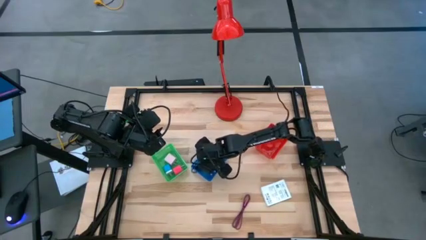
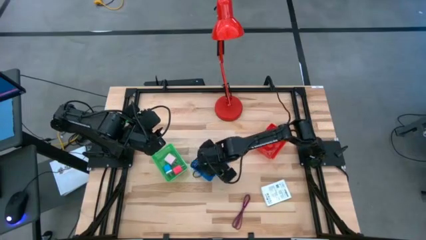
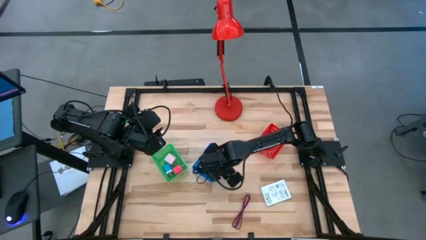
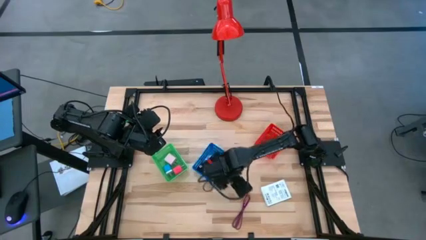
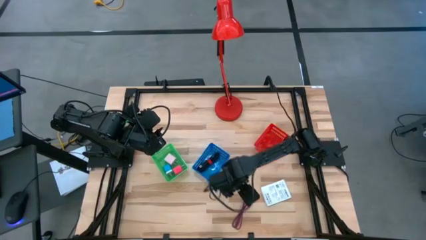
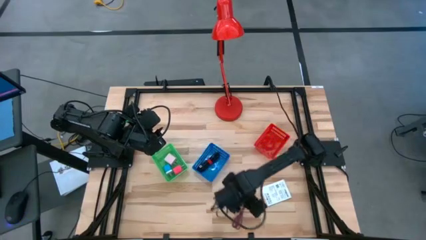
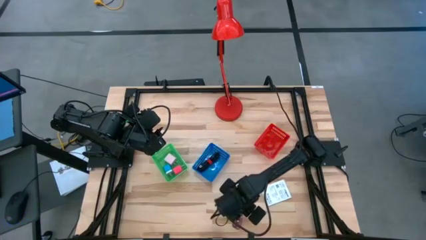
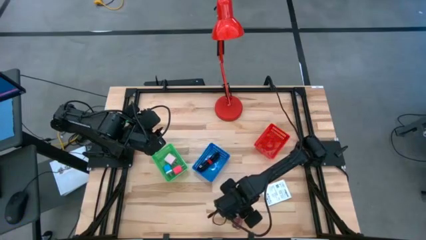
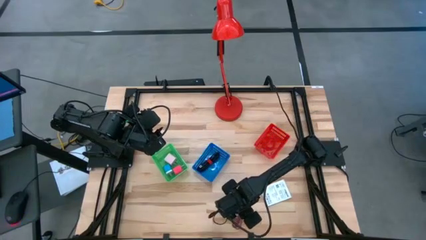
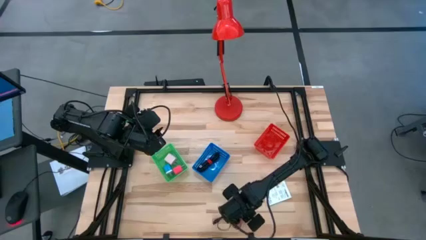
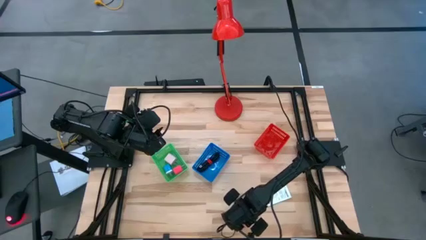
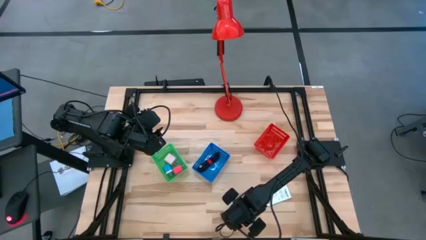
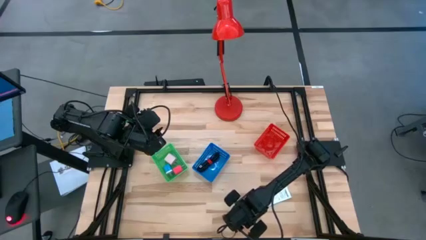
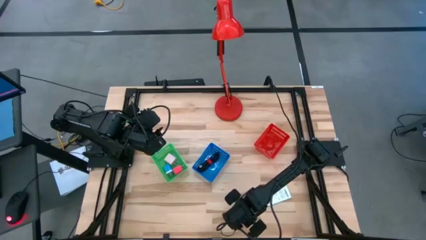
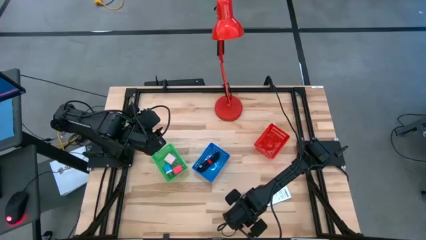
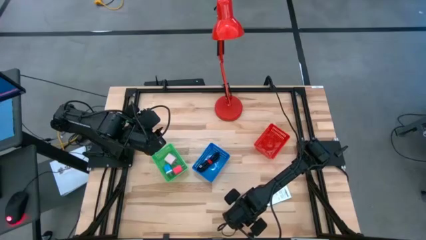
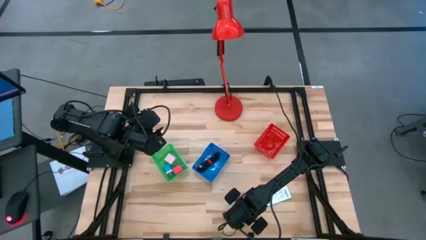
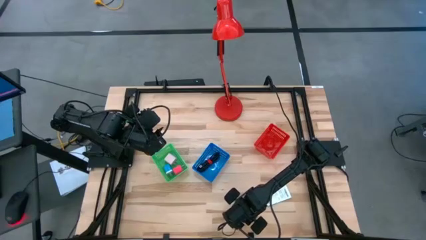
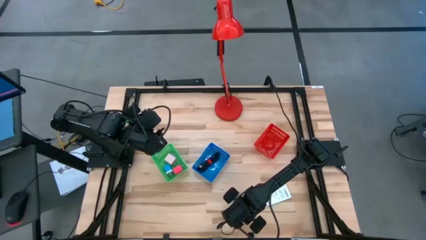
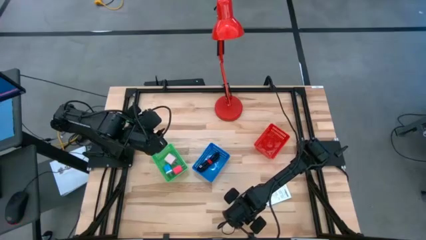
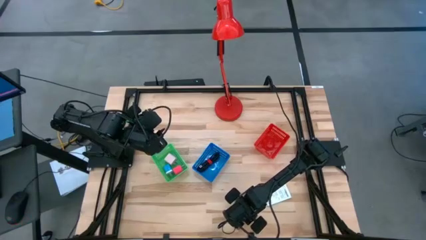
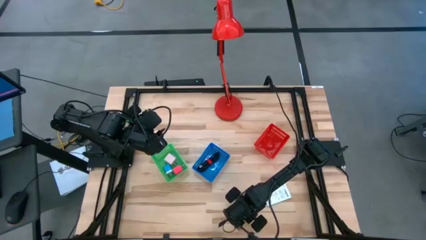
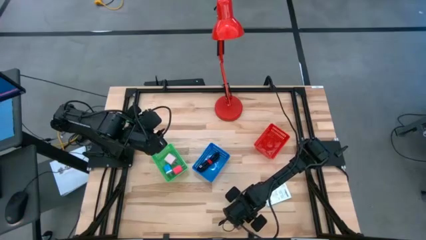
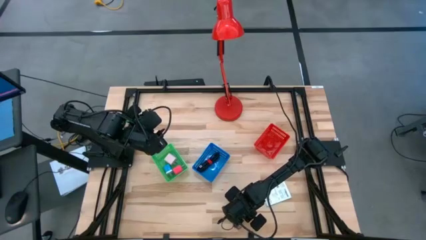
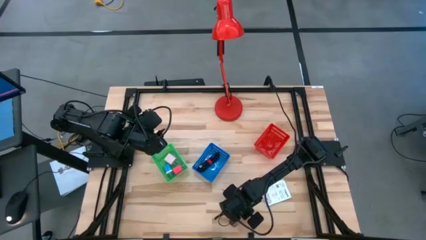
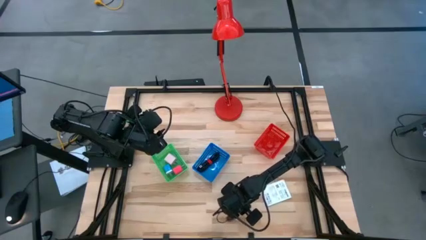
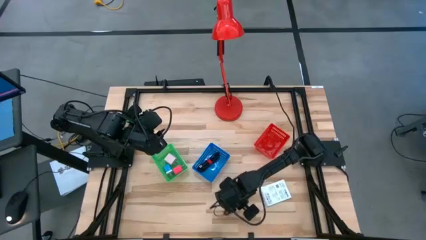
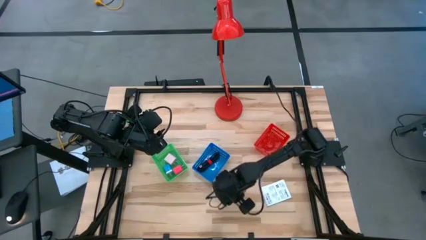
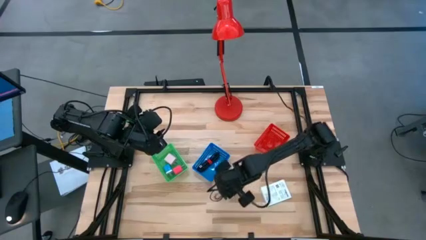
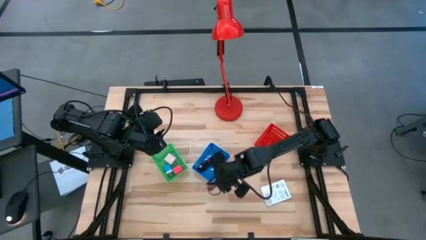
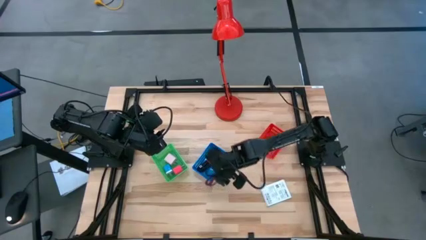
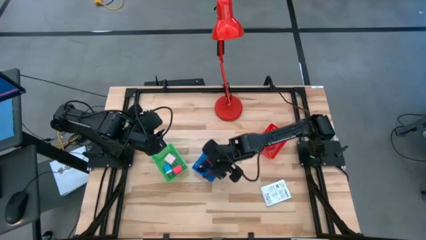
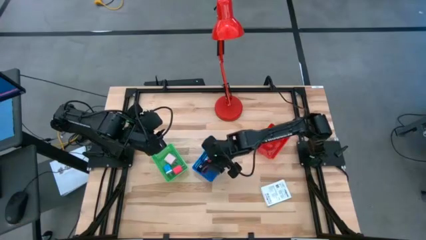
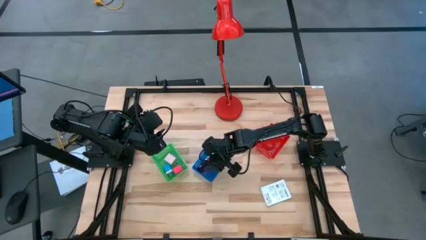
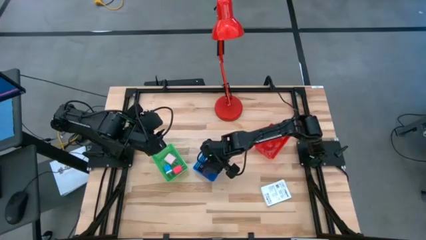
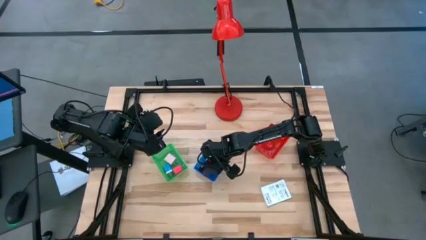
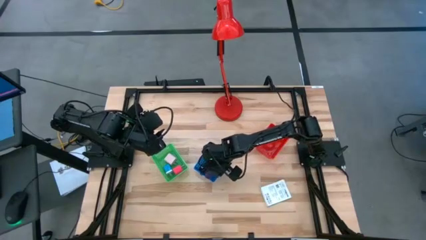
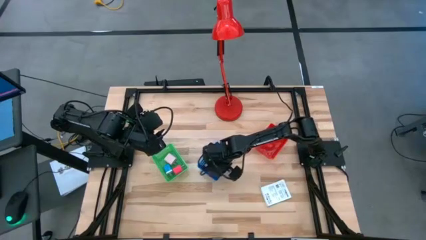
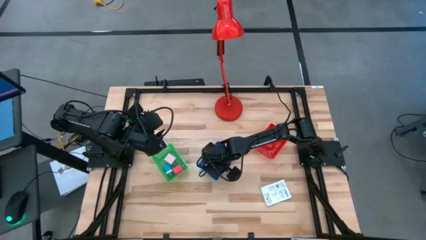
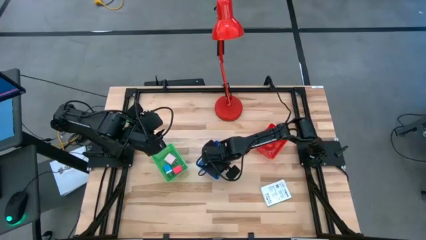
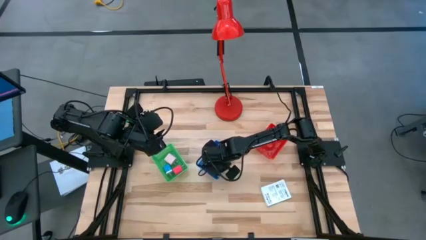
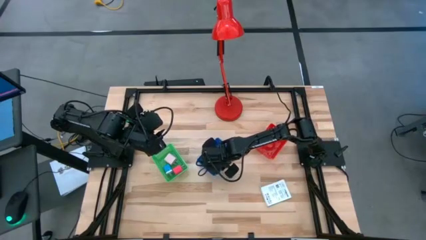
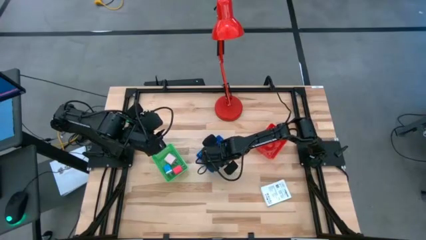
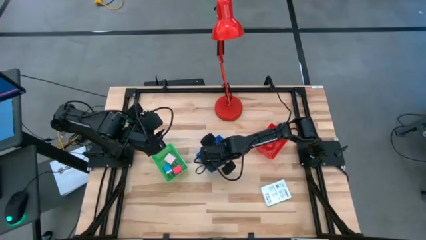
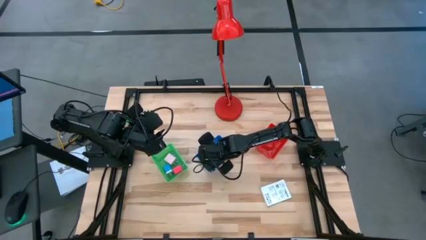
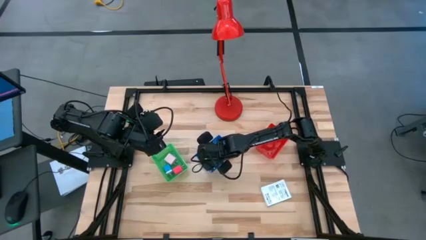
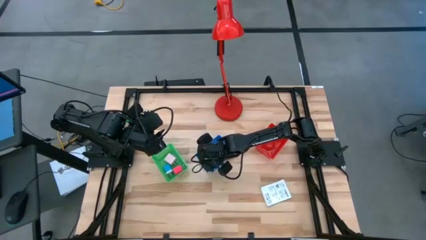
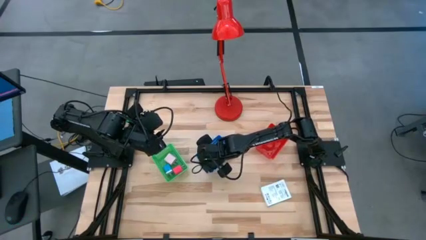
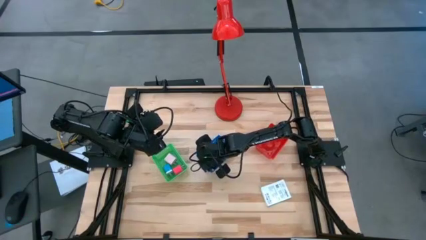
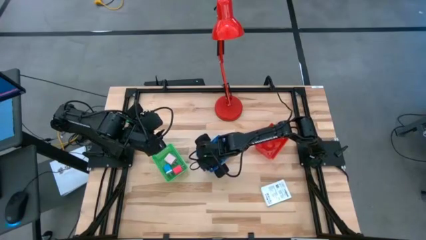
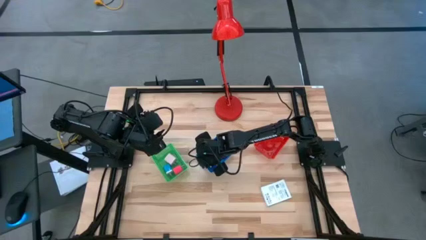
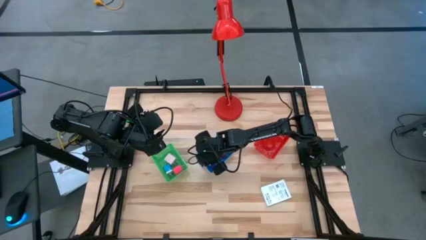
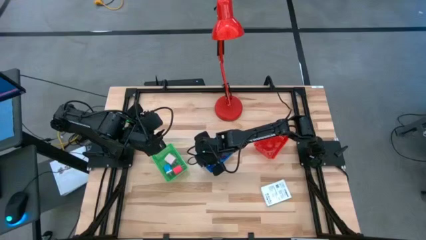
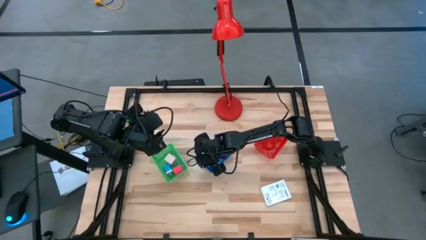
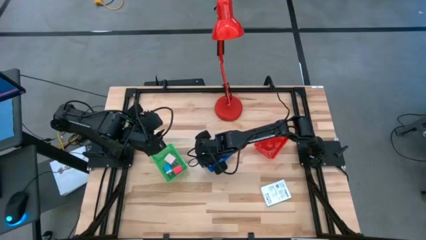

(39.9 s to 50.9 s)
Task: Pick and place items into bin
Put the pink charger cable into the blue basket
